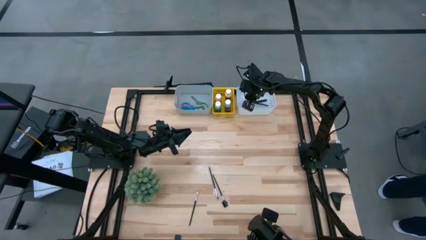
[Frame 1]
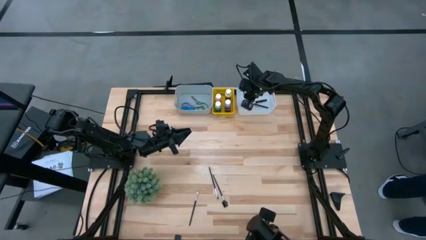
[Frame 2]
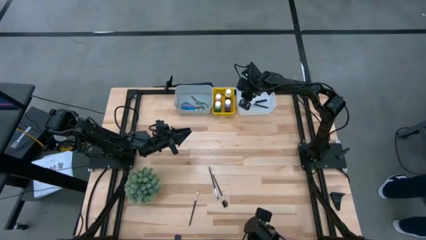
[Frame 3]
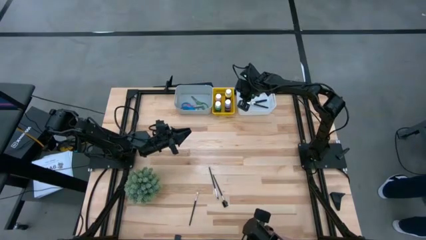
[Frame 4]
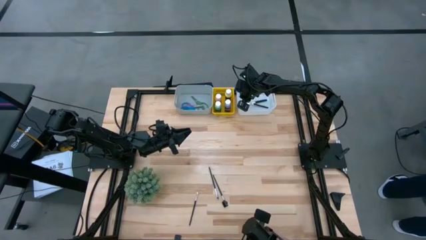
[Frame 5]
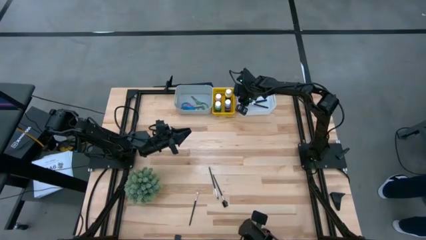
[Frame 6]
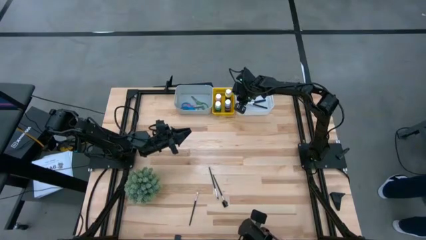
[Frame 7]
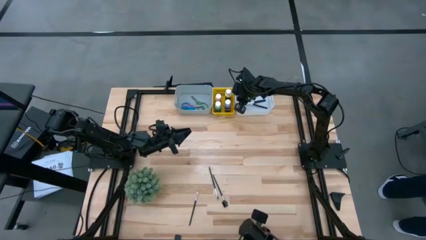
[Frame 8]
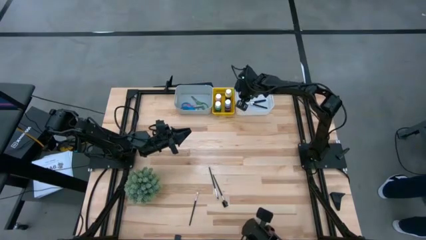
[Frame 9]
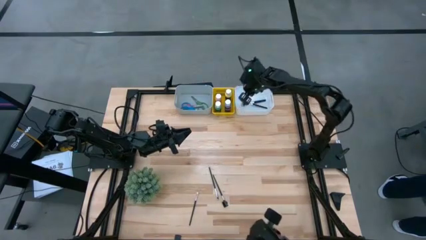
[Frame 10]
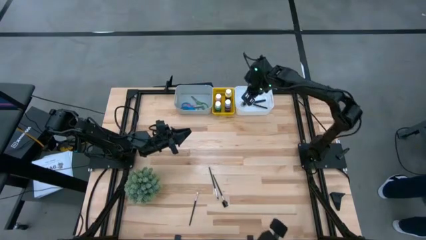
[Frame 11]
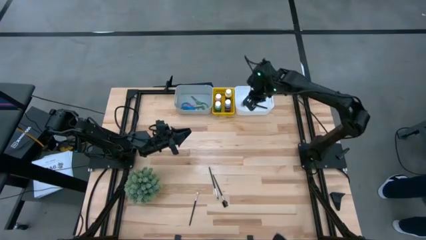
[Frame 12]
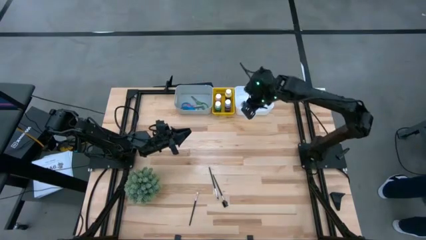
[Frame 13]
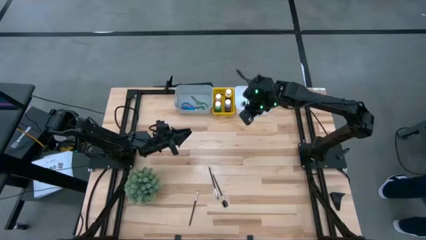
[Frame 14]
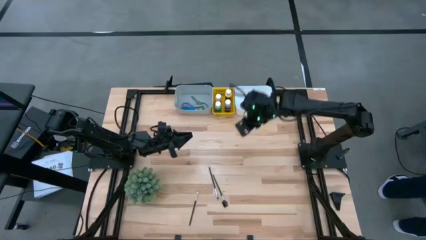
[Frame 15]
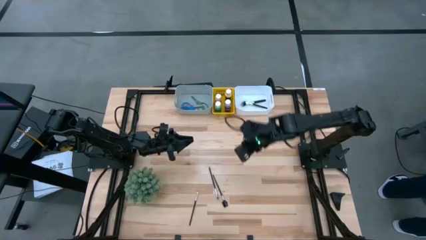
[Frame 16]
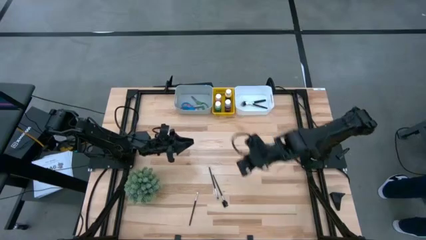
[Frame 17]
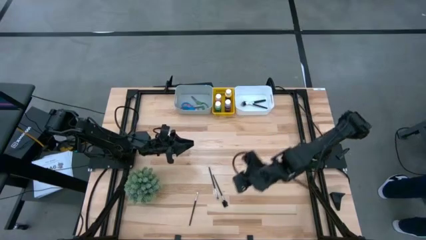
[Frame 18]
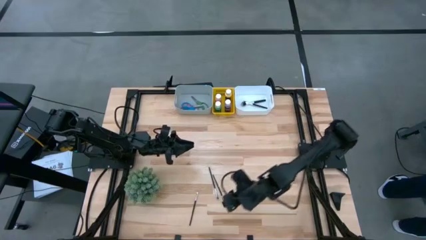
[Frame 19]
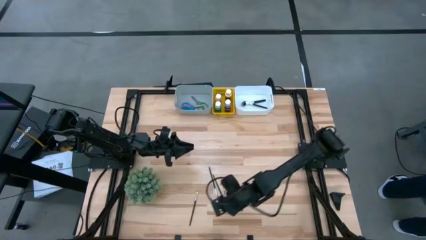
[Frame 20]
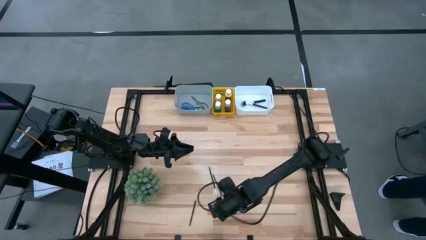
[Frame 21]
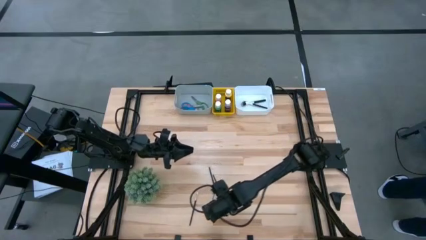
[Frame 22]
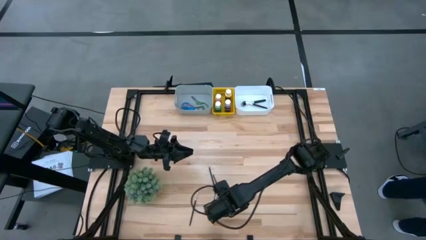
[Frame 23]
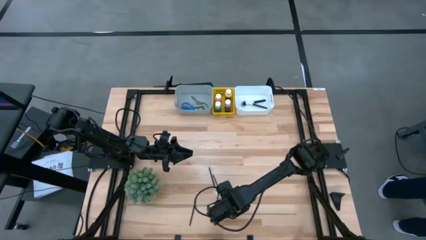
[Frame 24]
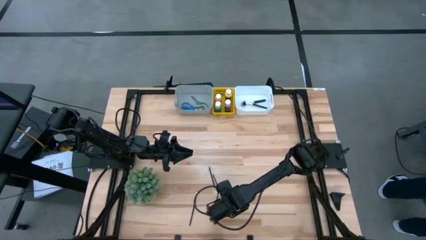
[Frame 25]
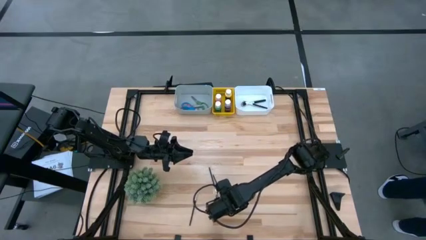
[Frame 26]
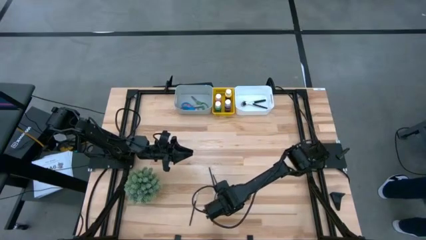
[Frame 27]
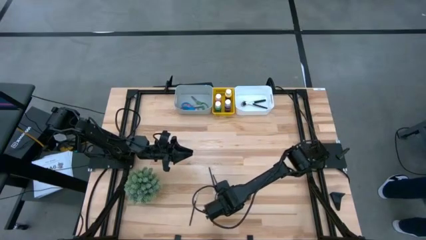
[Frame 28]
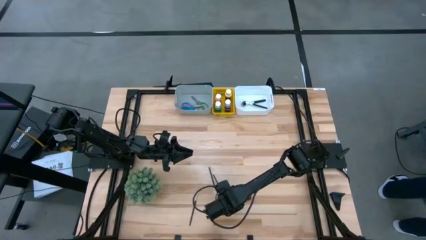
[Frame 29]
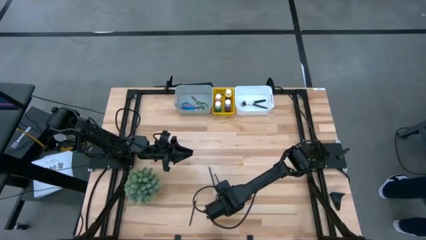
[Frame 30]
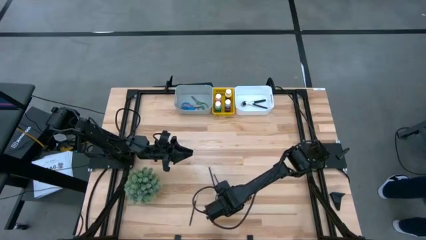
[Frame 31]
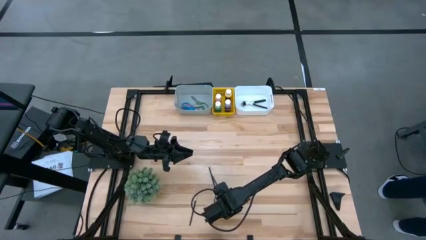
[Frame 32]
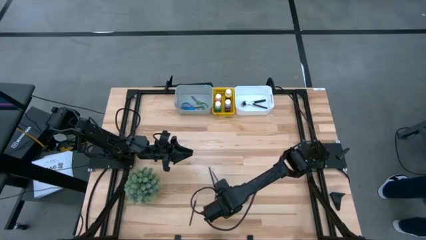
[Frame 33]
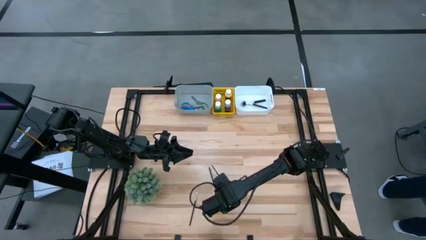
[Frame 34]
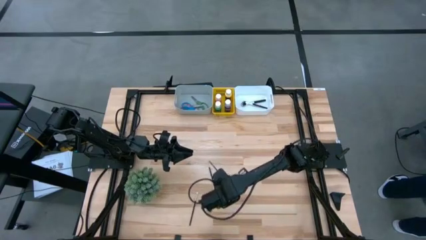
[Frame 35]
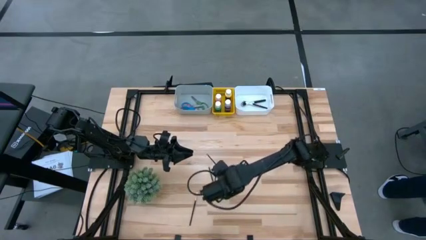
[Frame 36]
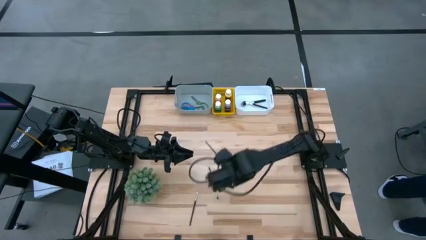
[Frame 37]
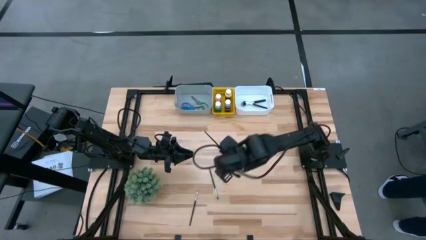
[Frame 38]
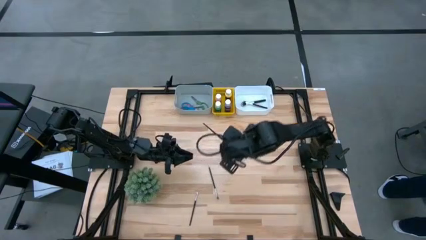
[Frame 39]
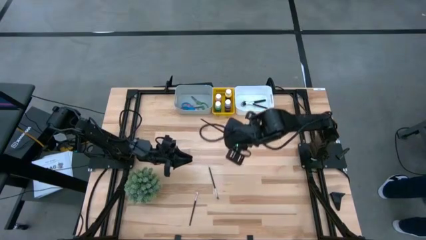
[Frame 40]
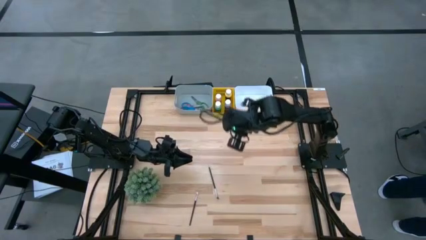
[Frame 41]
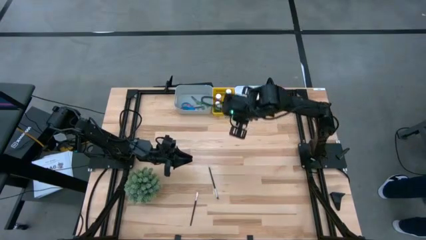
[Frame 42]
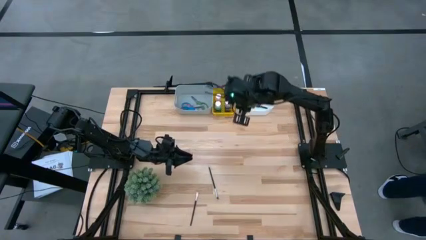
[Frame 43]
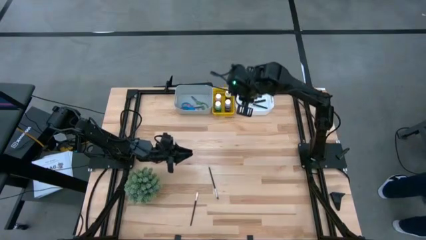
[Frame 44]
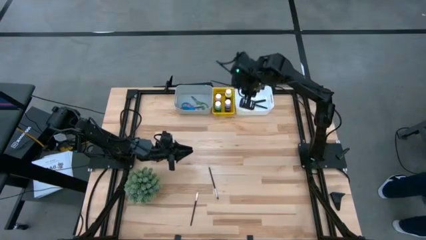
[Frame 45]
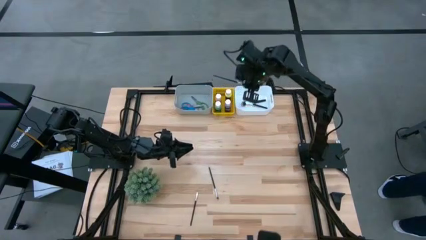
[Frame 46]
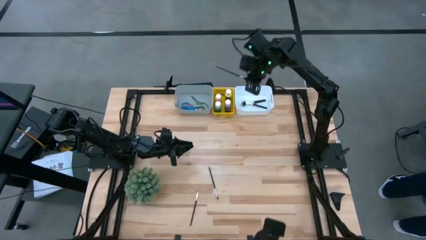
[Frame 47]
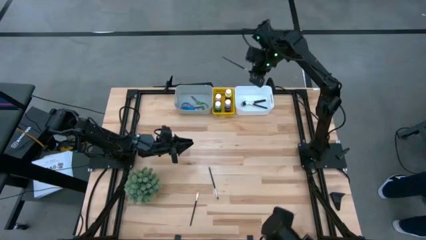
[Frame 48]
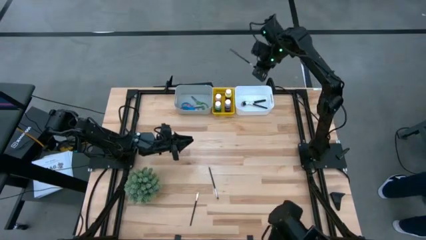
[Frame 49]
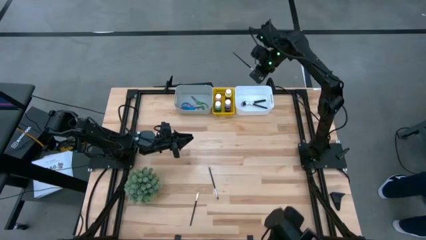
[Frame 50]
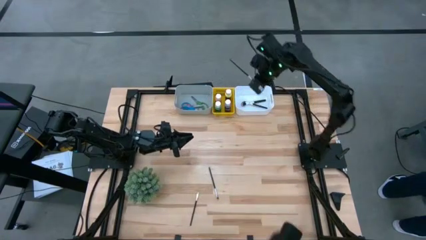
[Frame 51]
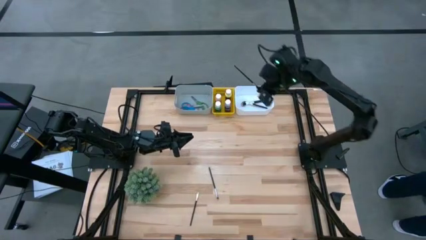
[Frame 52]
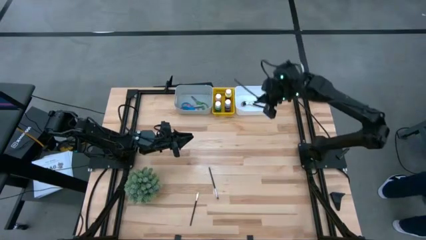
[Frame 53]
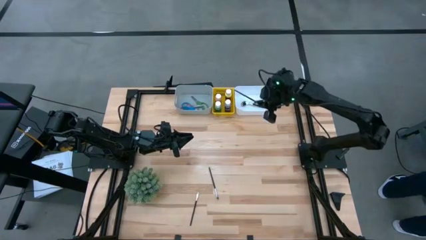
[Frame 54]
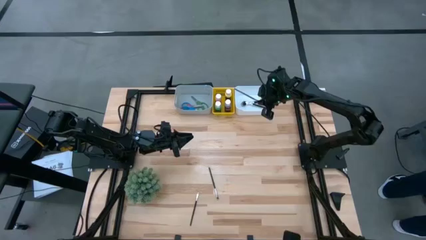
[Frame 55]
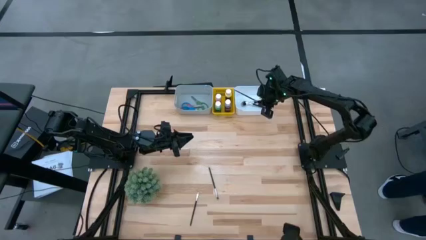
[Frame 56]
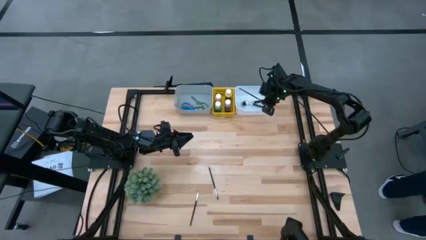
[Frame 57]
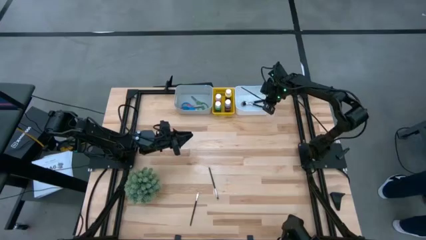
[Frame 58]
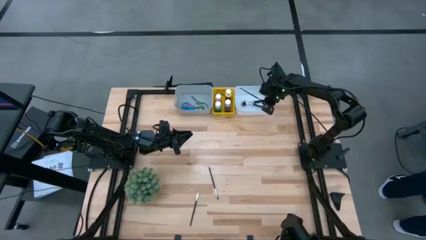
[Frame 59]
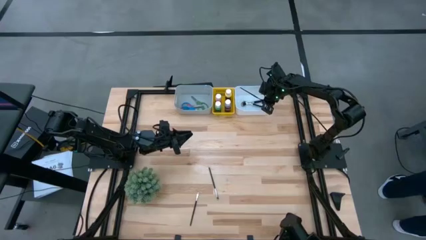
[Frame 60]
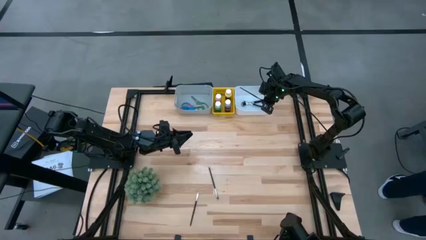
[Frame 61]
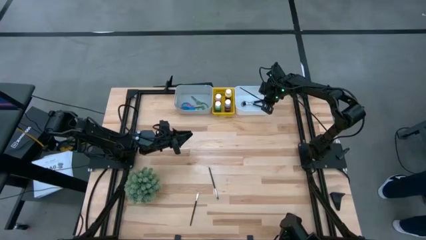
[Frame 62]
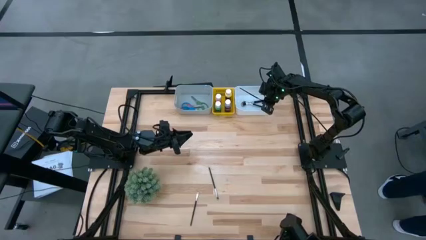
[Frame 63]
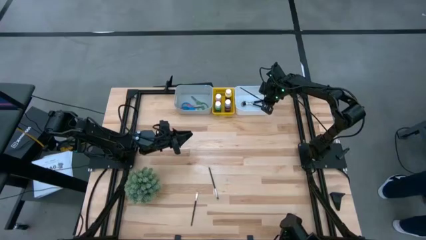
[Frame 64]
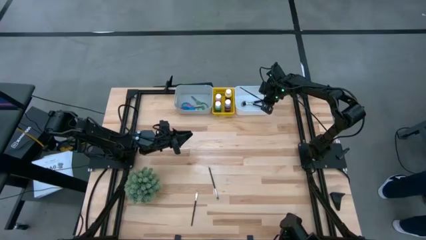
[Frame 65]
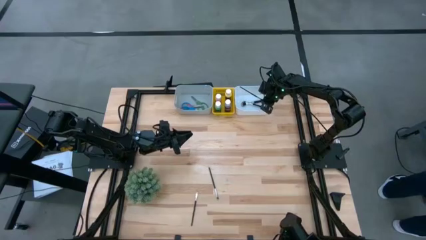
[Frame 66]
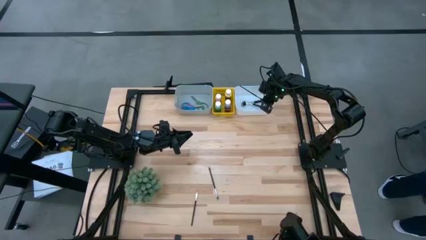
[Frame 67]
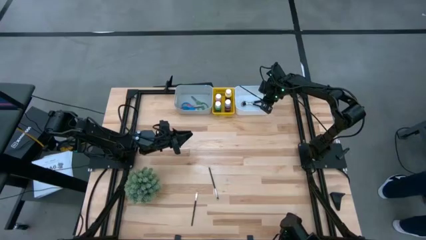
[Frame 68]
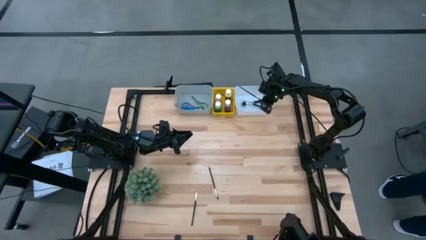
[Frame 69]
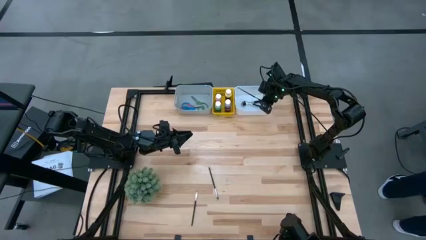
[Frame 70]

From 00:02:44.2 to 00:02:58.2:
Task: Pick & Place Paint Supplies
Put the eye groomer brush into the white bin

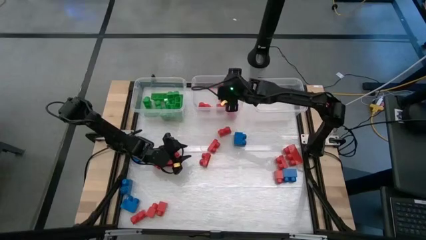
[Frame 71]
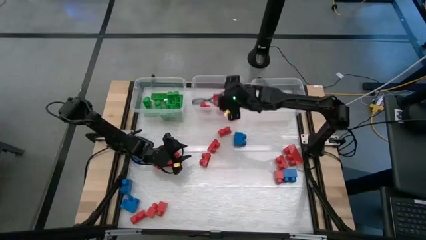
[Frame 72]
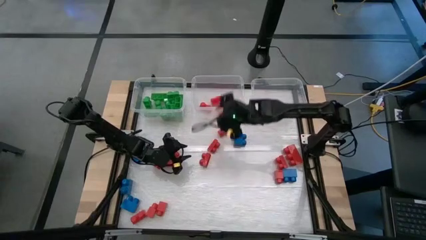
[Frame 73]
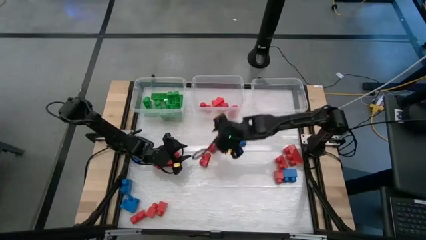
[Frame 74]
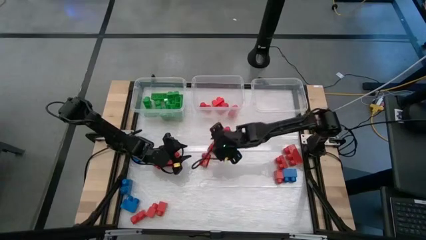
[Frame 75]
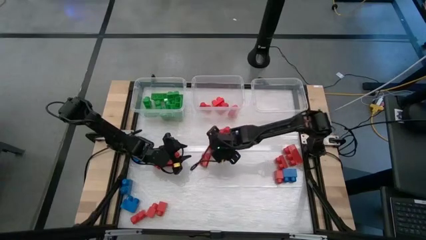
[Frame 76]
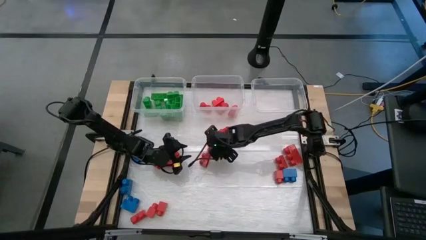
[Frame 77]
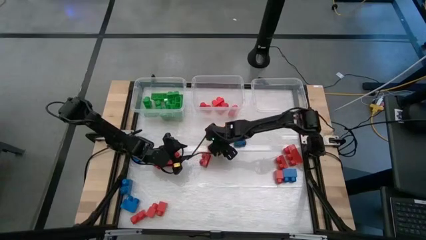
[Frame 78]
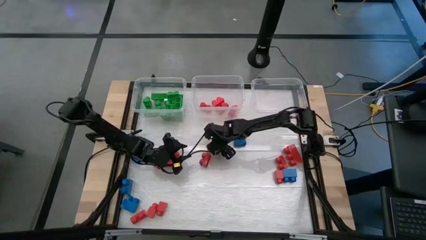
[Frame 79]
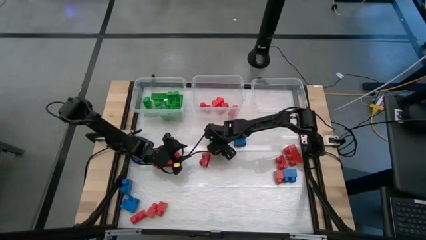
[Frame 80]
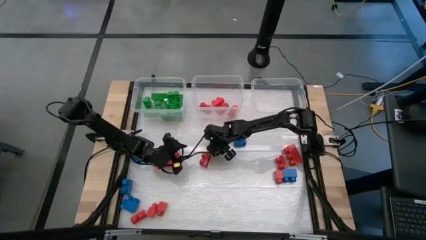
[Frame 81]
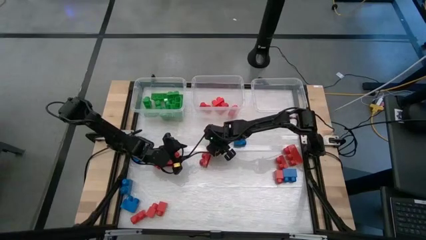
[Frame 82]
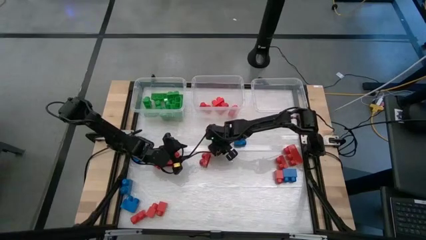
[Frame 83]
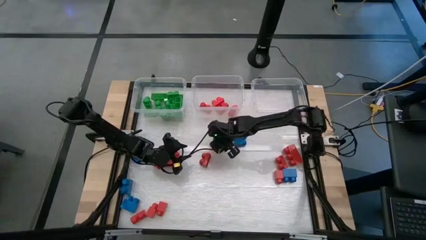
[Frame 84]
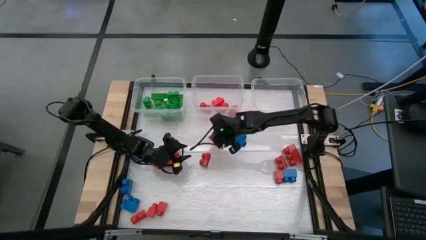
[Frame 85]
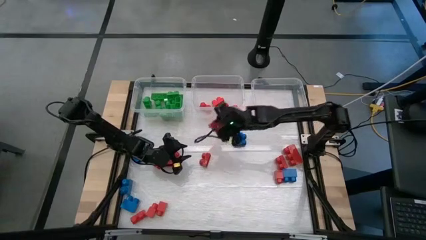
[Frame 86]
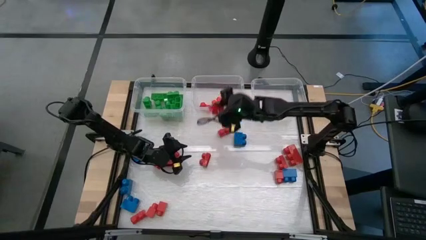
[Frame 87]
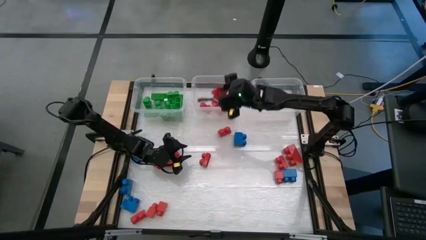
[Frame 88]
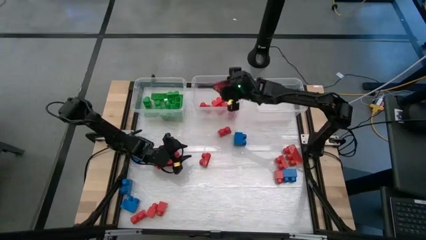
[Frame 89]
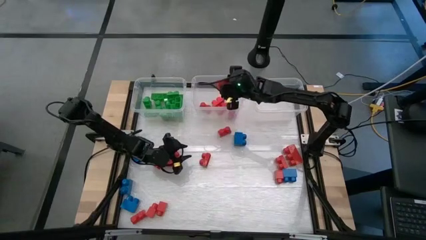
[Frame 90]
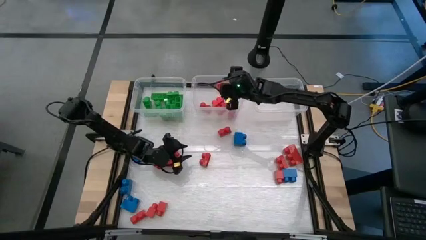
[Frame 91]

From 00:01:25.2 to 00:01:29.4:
Task: Sort blocks
Put the red game piece into the middle transparent bin
